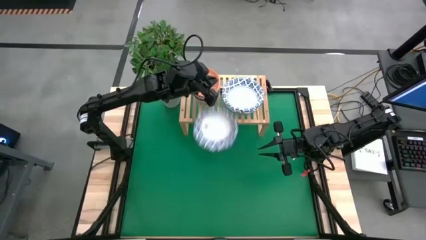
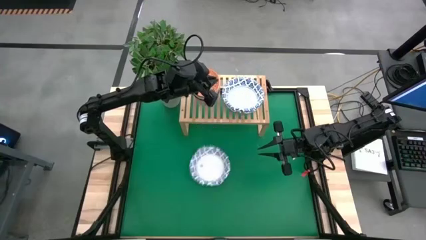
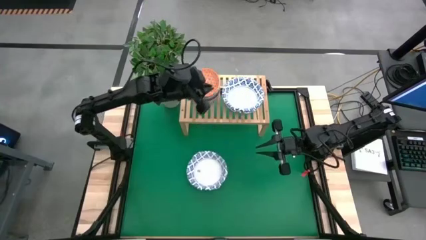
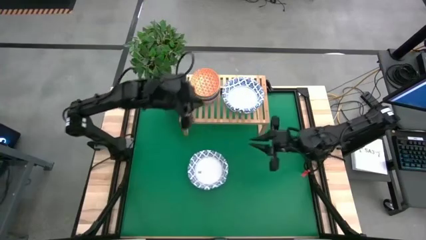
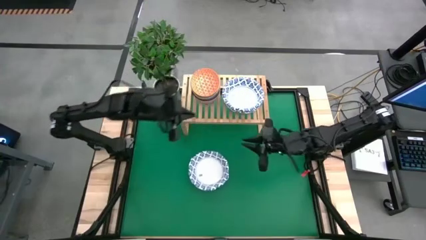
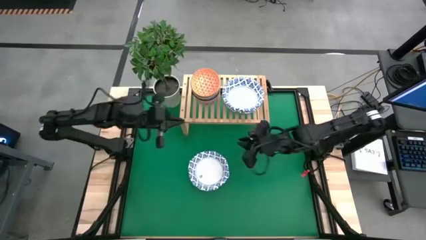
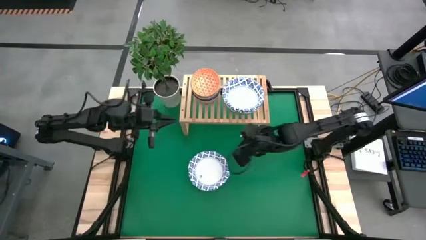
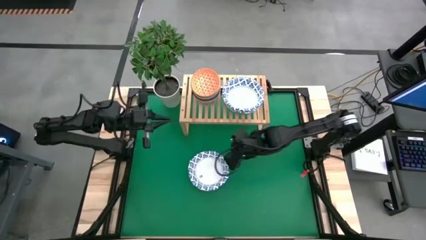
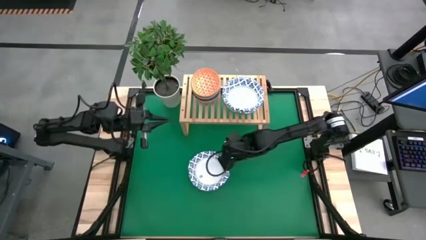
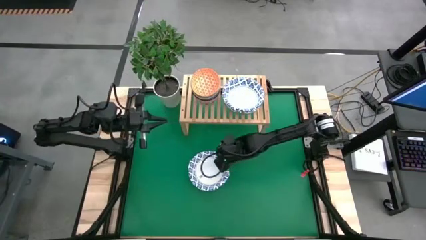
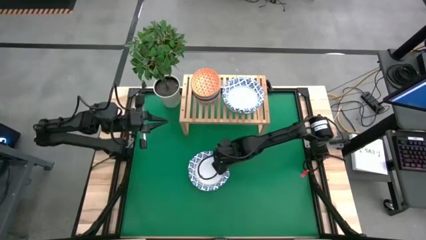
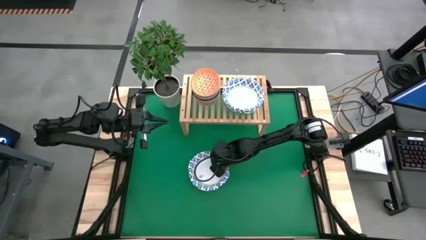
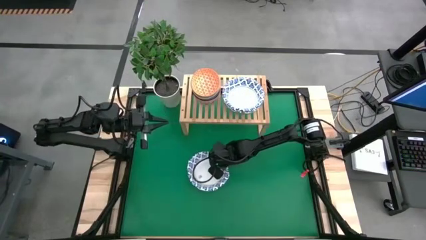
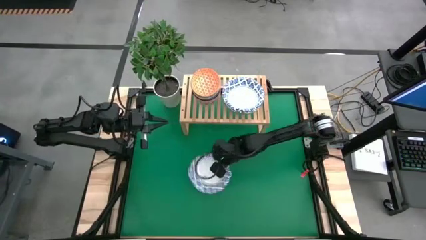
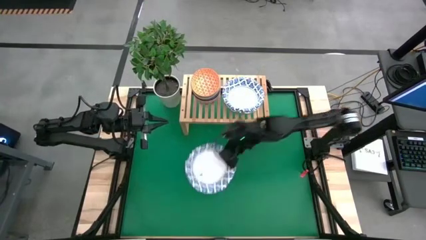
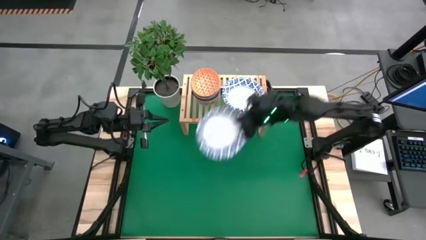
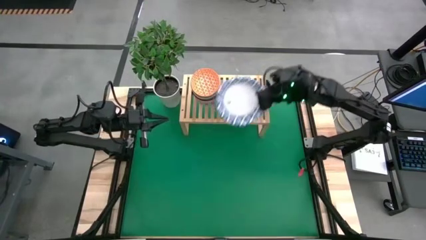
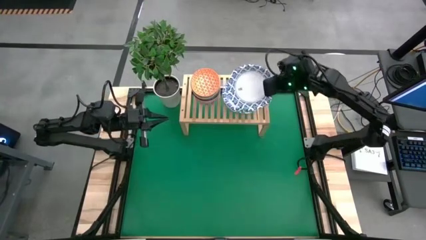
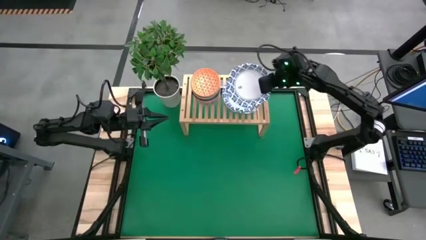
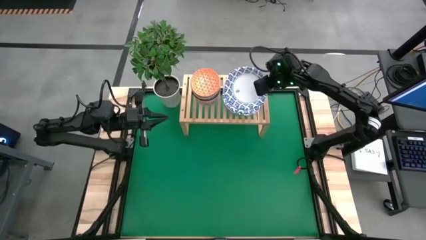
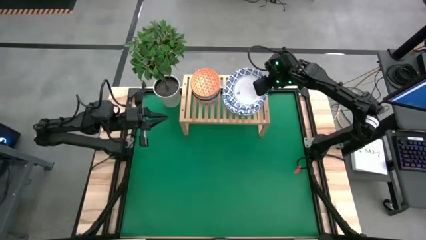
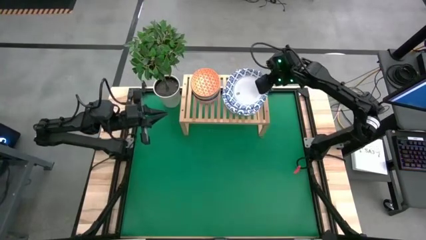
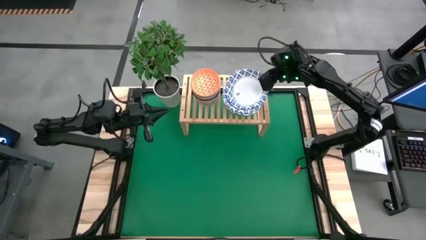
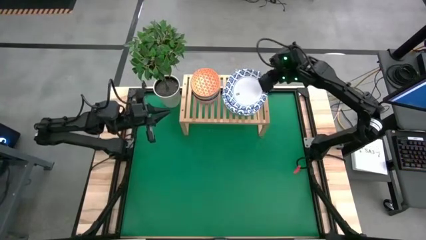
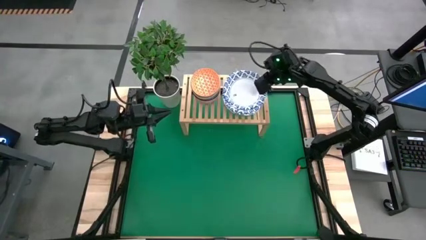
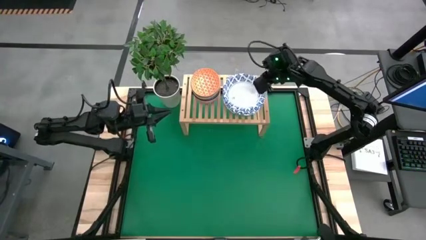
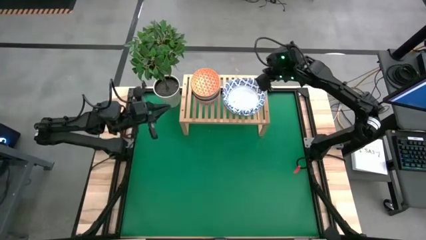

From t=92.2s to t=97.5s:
Task: Place and stack bowls onto a shelf
Stack the white bowl on top of the white bowl on the shelf

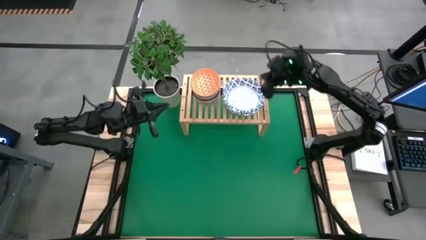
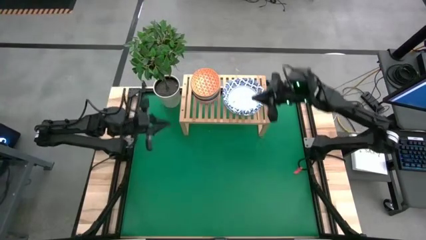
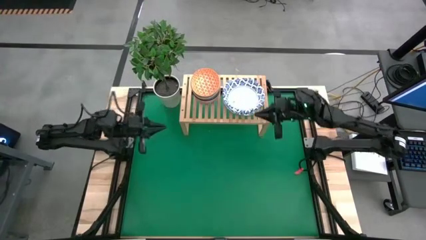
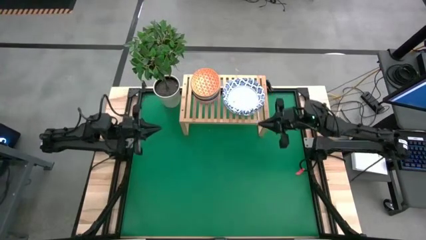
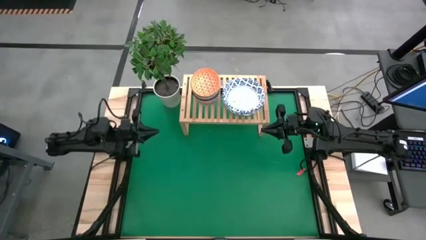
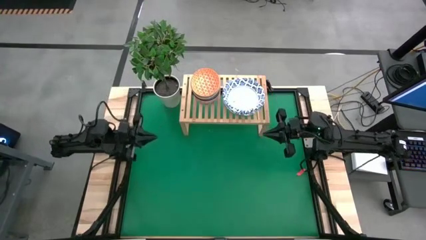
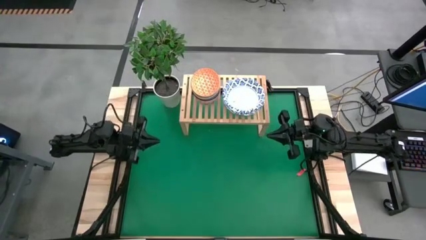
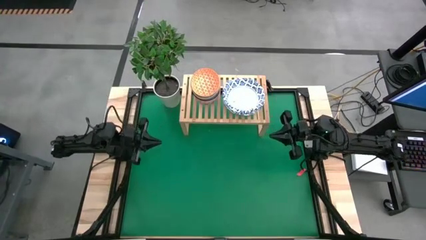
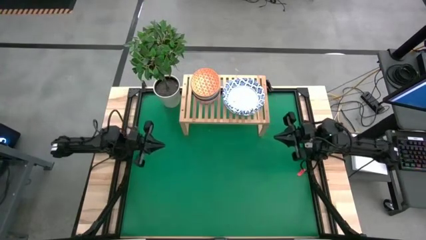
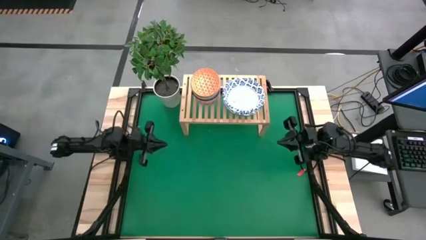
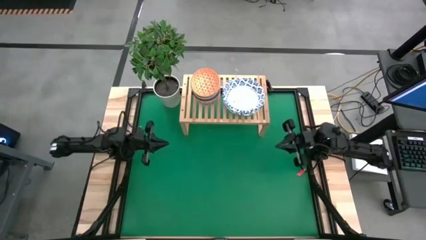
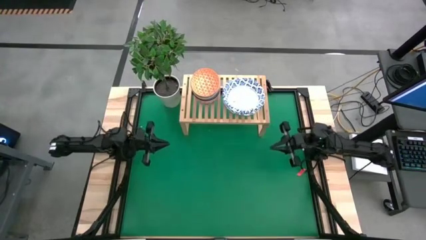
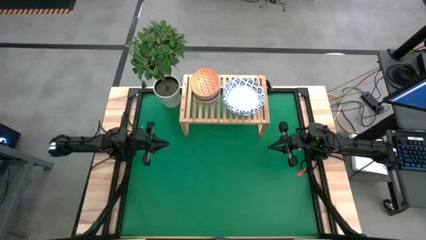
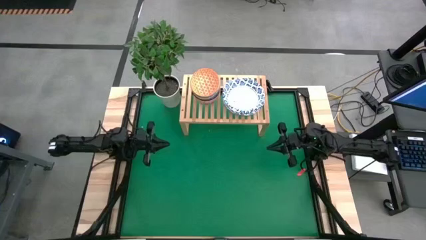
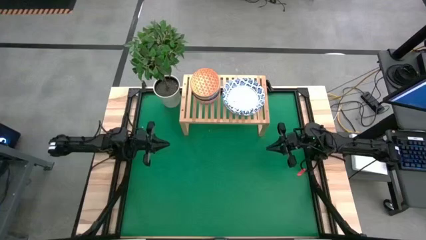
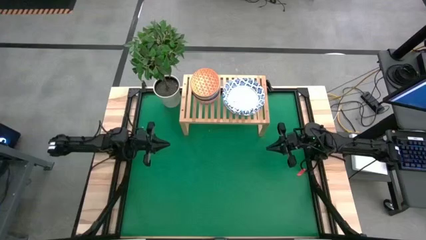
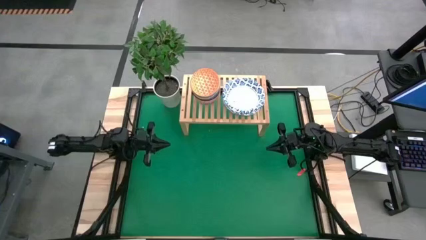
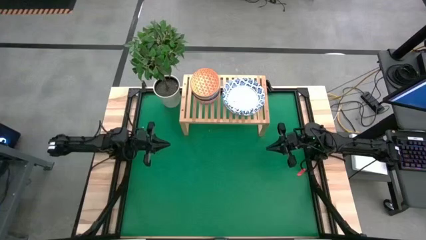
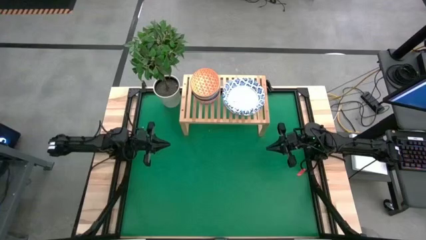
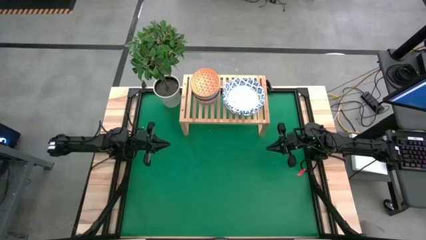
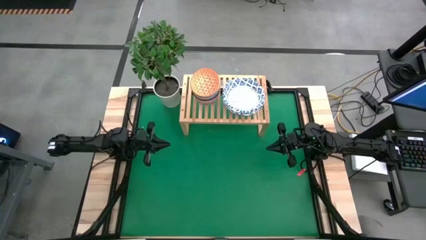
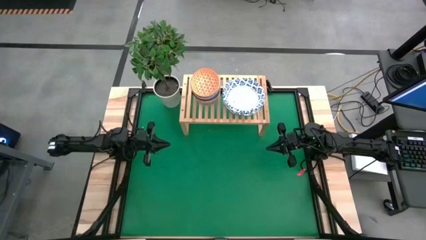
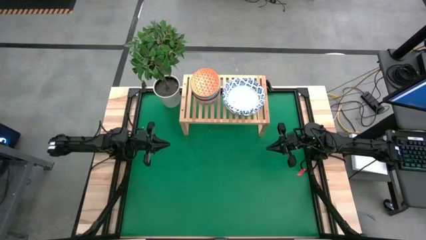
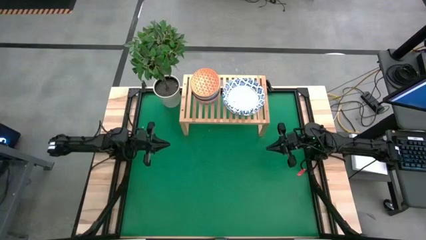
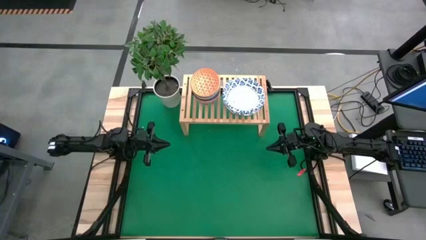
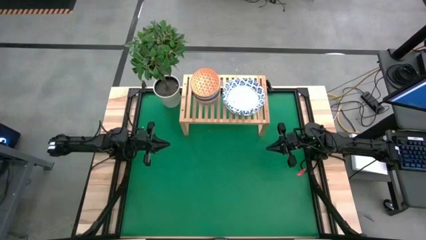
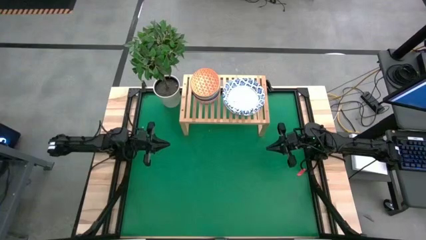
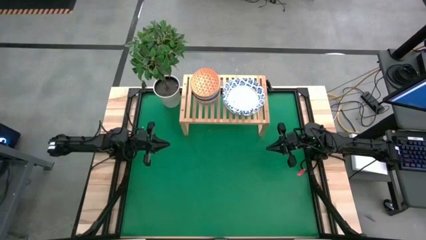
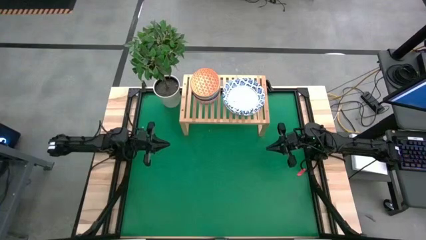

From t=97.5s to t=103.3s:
Return to Home Position

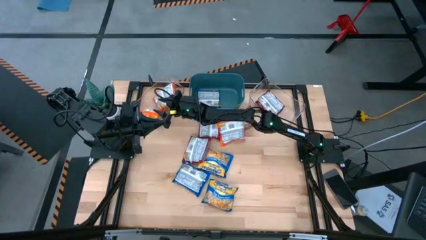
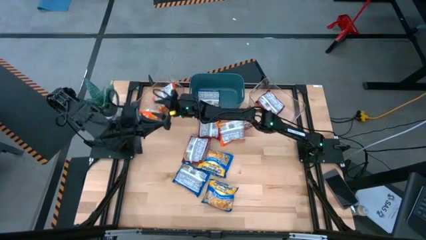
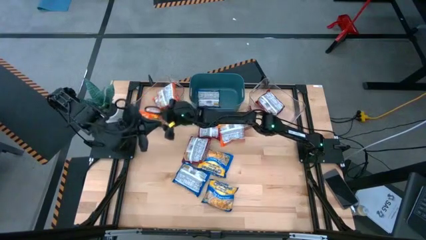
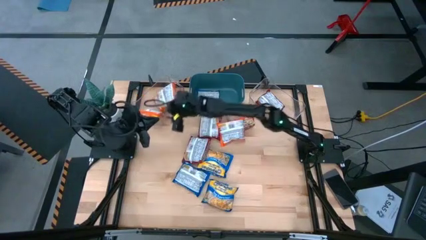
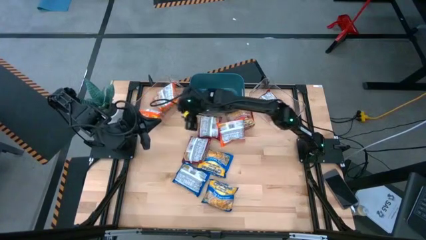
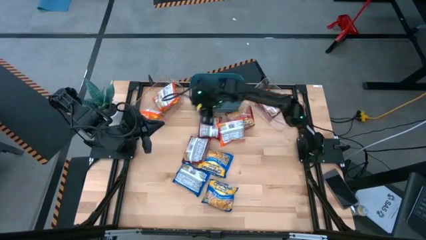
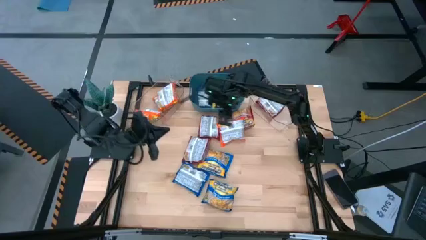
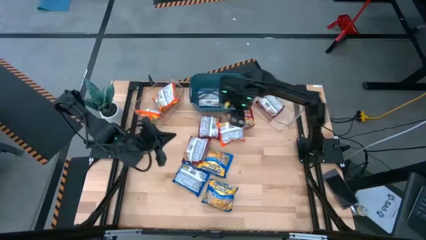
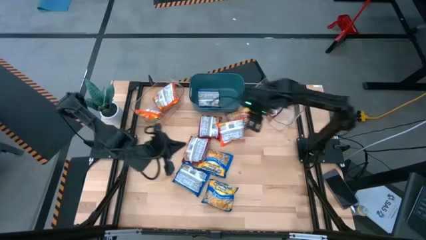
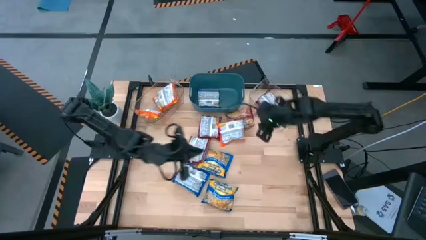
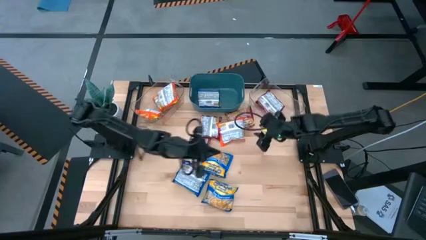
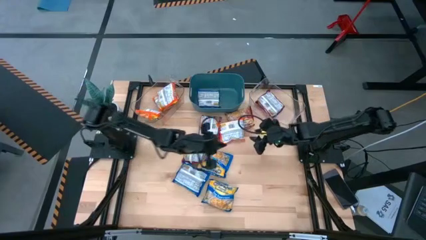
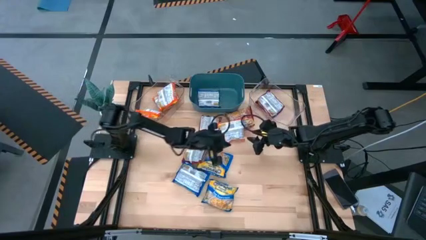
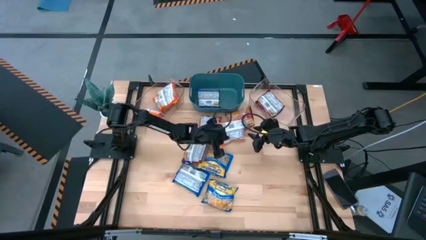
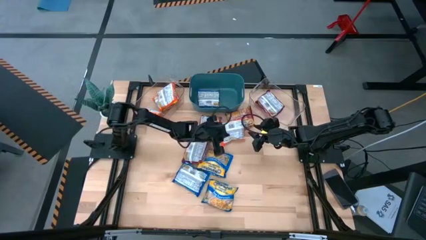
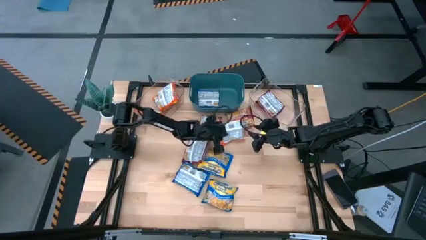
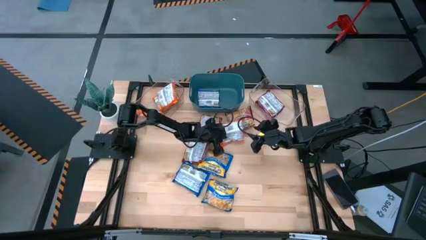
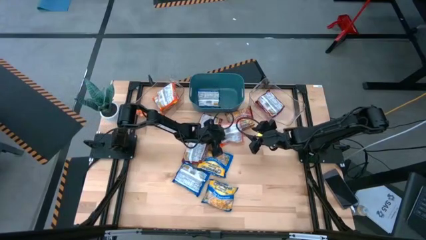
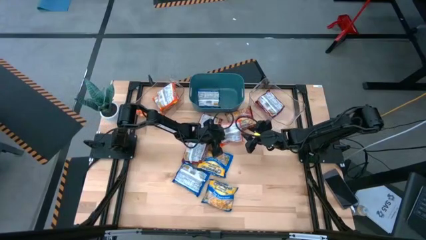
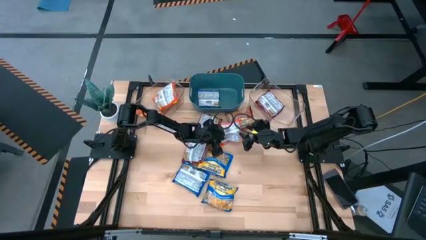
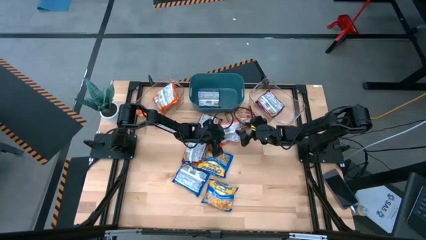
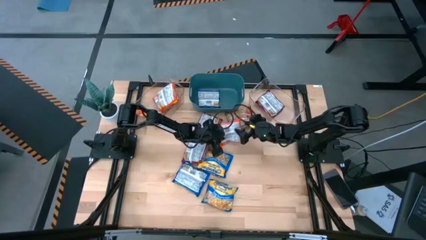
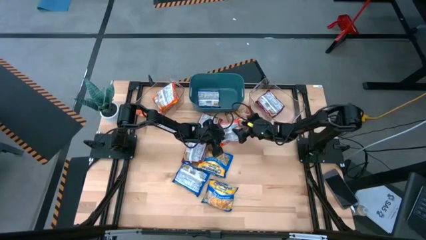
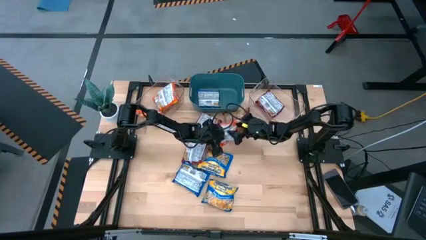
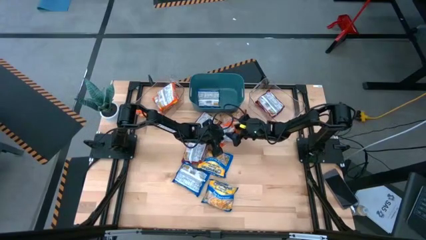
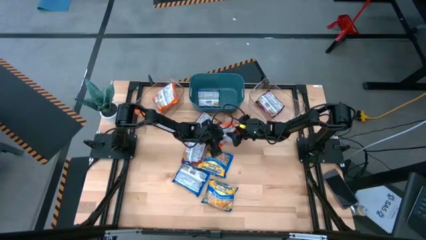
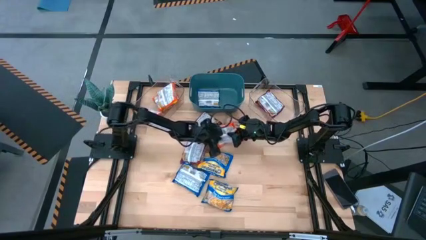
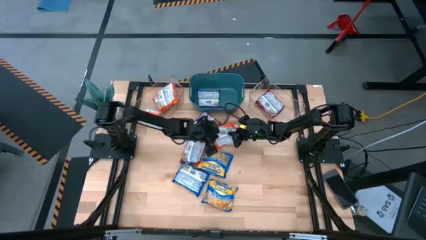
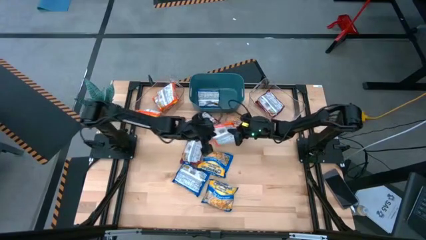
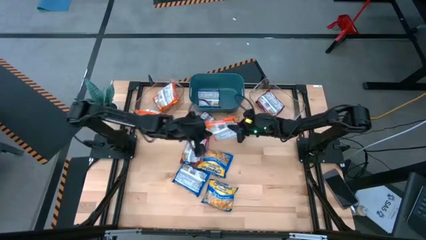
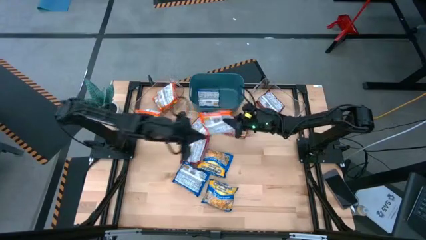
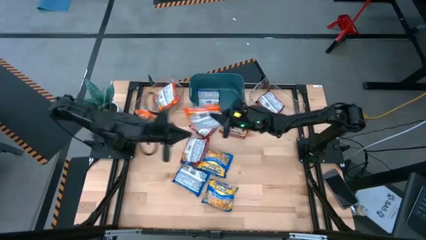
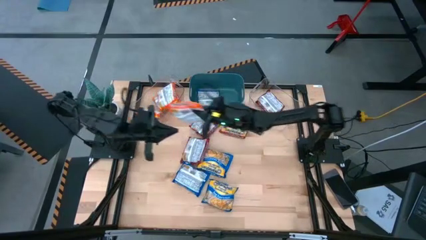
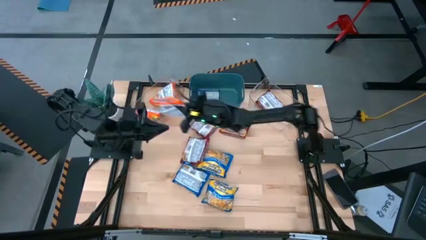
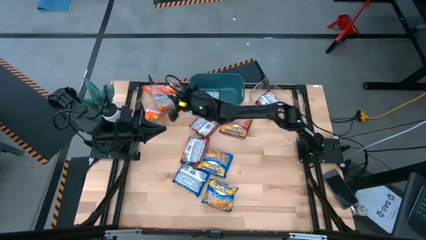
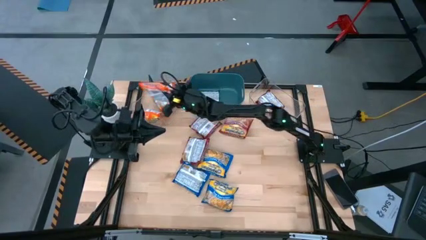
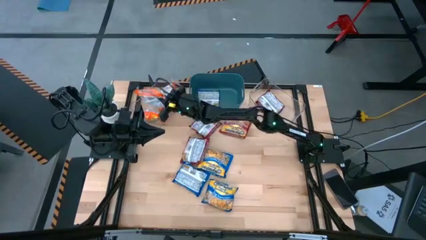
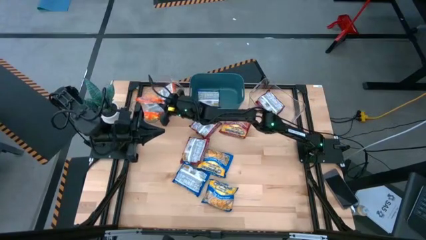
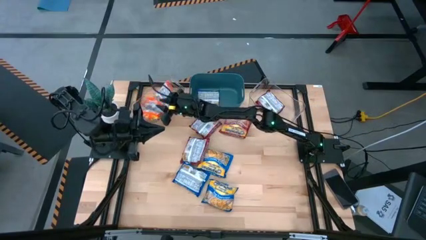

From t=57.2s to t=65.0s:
Task: Sort Maruchan noodles
Put the orange noodle pack into the left transparent bin
